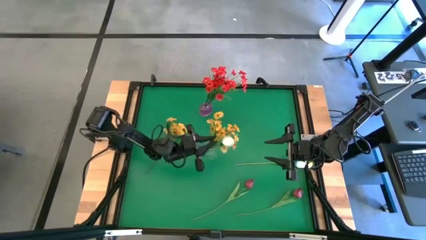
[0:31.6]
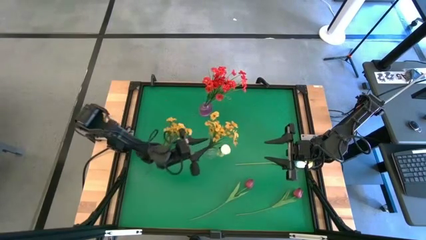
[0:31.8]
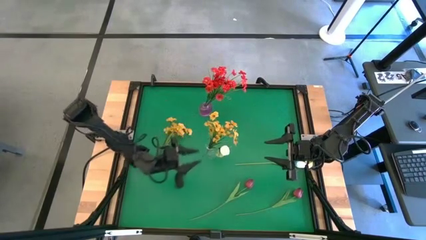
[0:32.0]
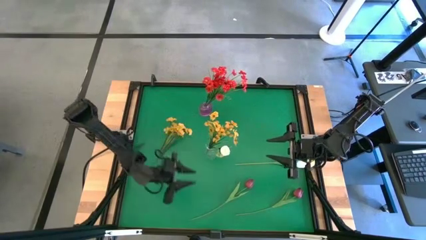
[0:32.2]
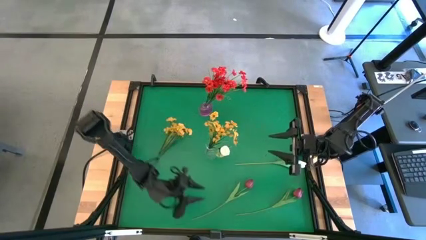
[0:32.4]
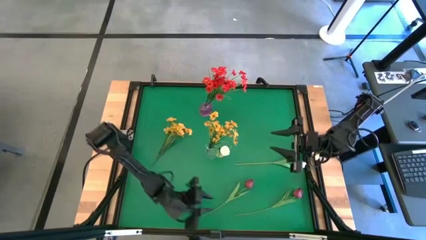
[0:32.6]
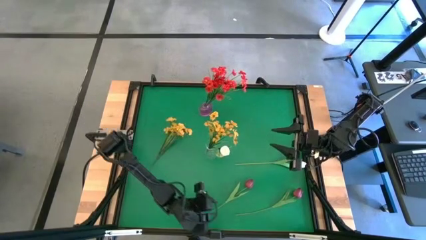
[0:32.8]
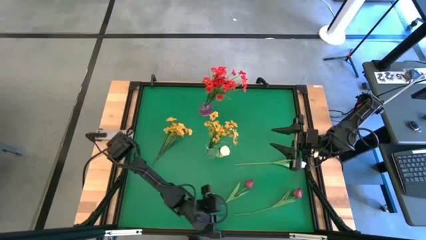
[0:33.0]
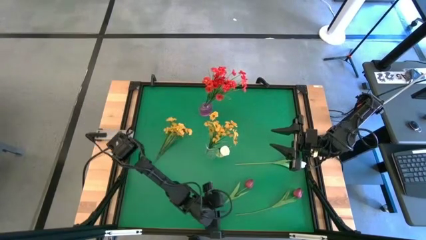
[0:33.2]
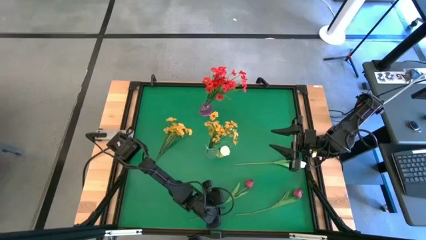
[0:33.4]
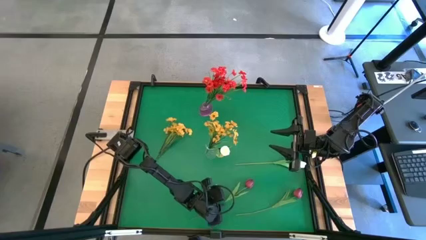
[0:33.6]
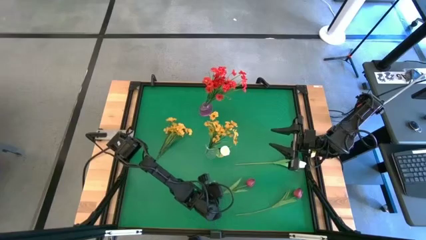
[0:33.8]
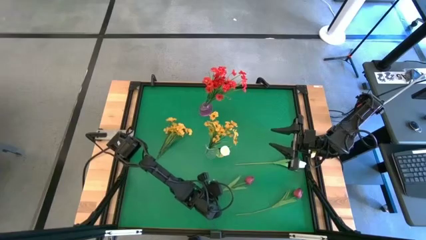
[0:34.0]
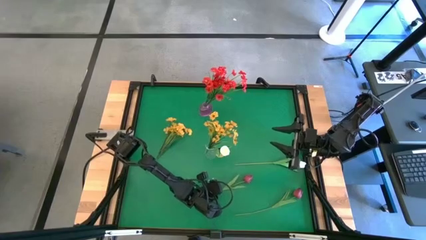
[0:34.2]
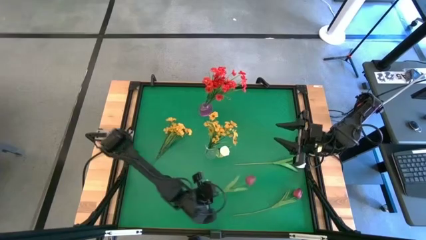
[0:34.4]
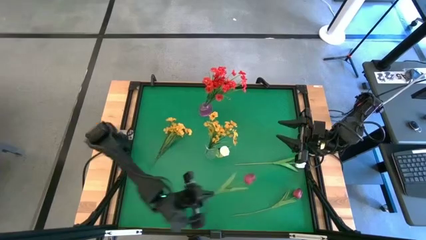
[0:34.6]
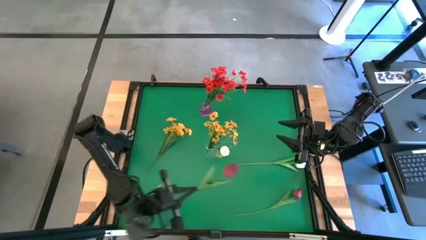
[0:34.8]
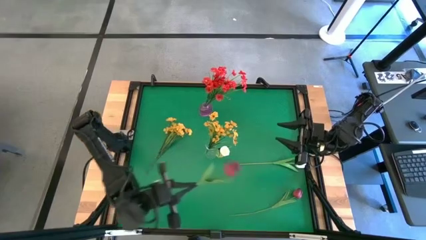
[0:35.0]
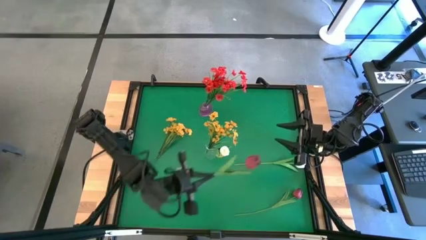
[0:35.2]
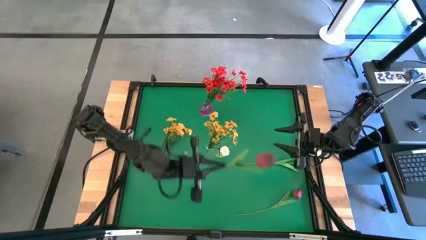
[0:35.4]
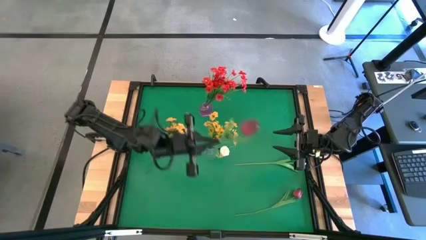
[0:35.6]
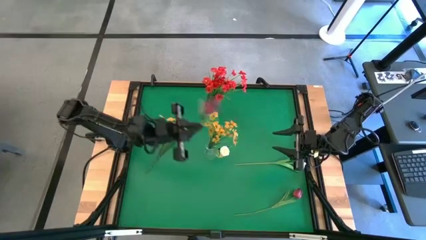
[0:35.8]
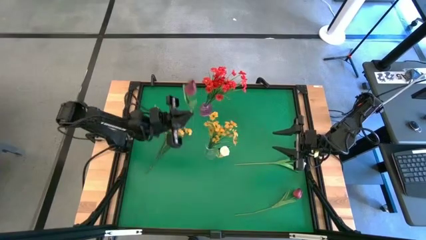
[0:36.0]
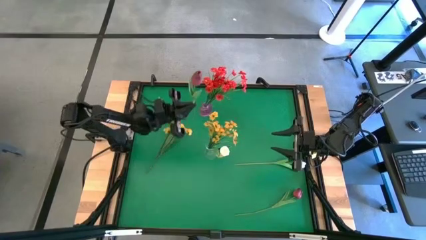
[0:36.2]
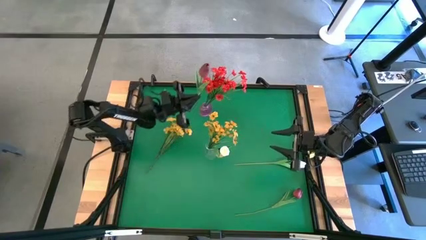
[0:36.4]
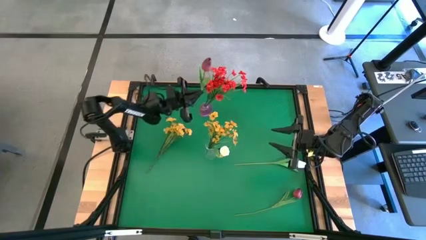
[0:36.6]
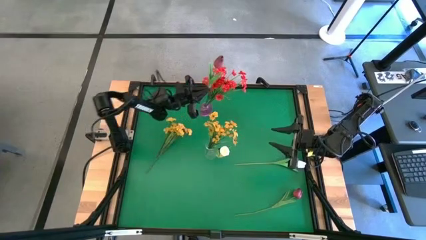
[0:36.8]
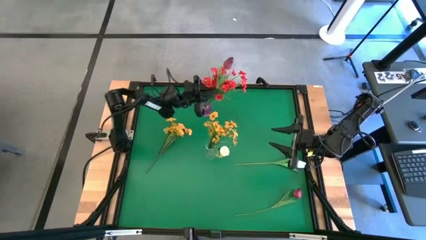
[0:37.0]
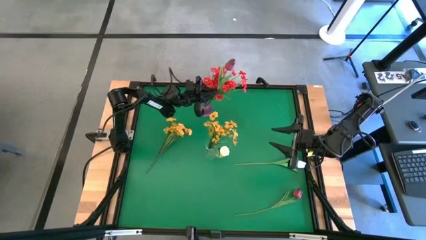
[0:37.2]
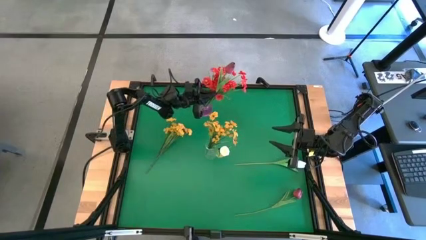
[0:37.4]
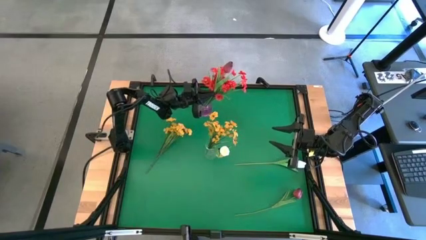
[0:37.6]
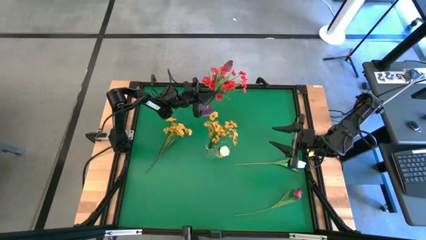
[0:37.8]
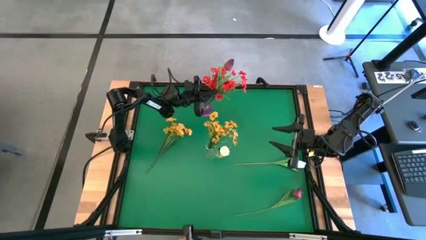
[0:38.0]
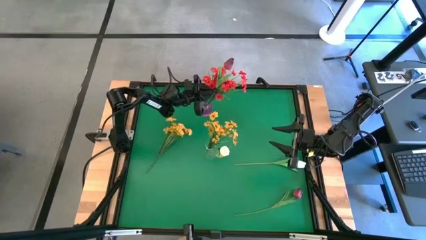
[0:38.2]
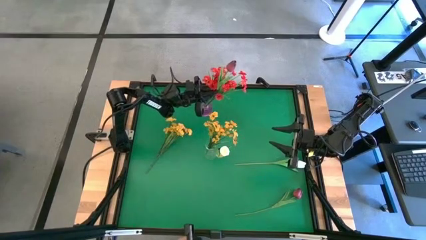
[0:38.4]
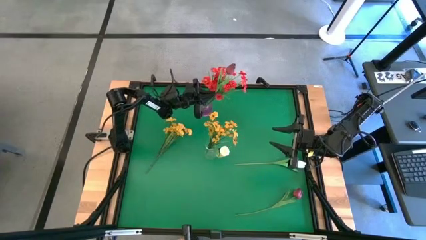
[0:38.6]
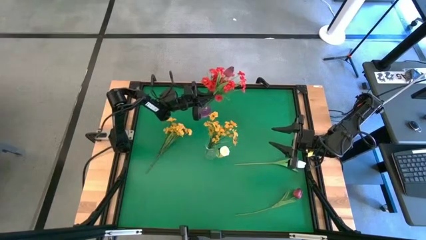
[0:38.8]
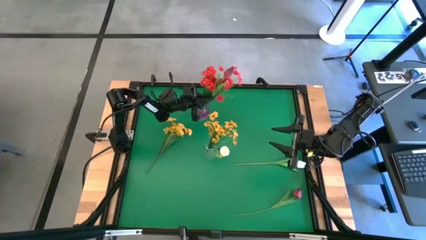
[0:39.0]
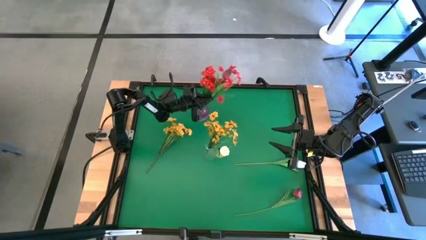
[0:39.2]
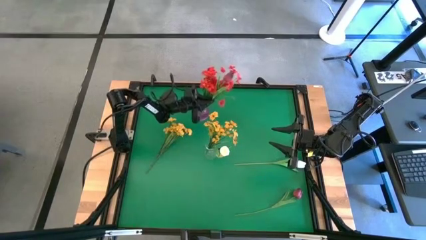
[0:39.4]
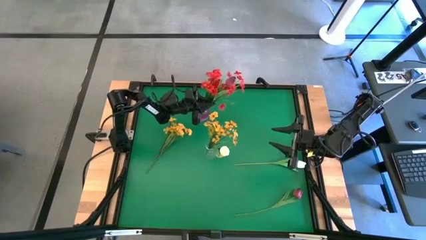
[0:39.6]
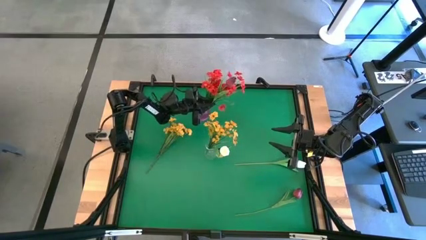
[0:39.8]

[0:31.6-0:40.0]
Task: Sort flowers into vase by color
Put the left red flower into the violet vase

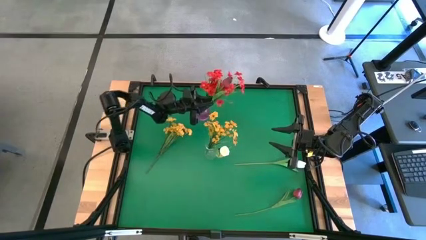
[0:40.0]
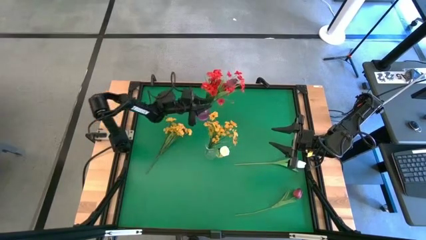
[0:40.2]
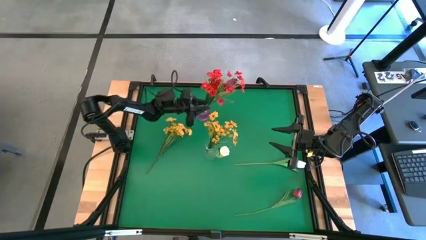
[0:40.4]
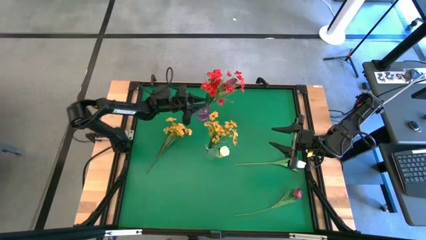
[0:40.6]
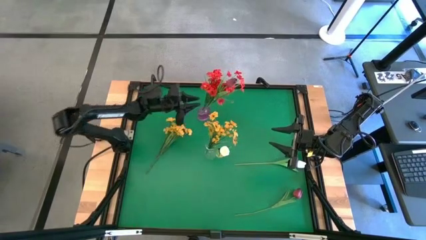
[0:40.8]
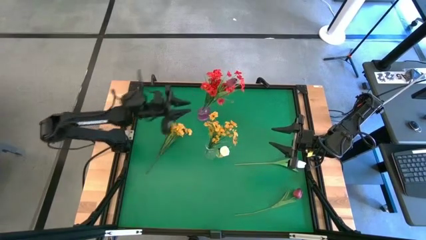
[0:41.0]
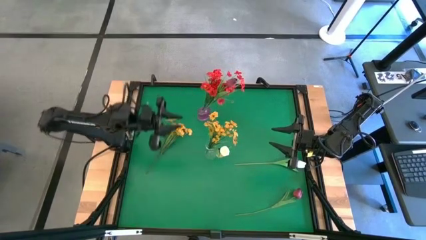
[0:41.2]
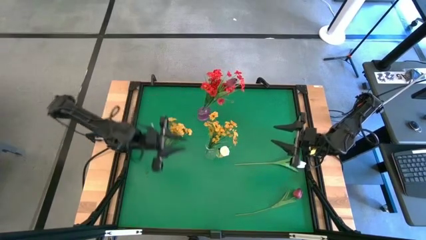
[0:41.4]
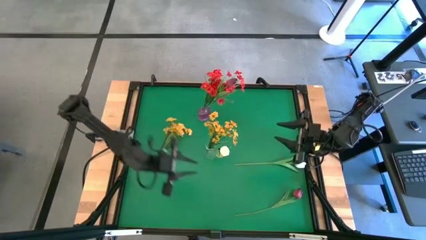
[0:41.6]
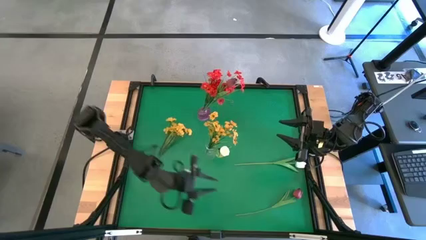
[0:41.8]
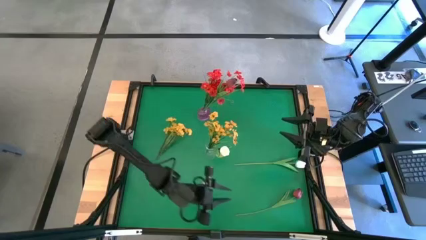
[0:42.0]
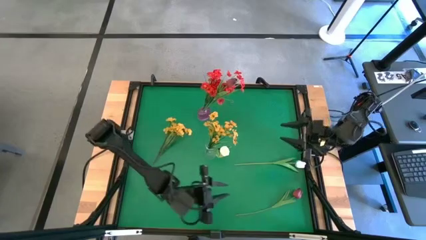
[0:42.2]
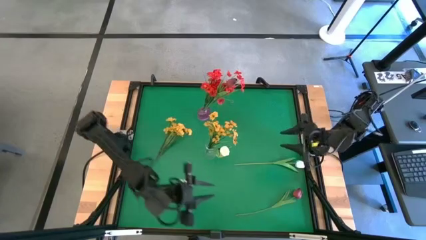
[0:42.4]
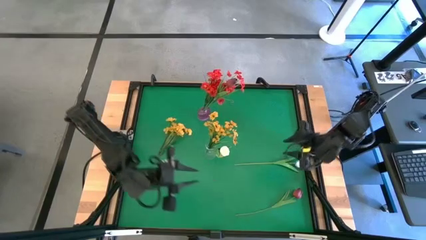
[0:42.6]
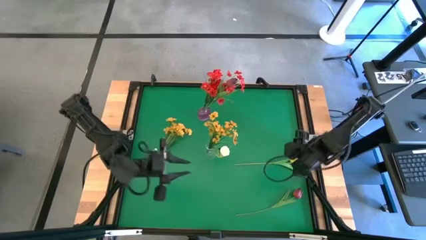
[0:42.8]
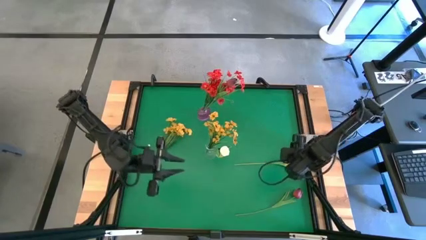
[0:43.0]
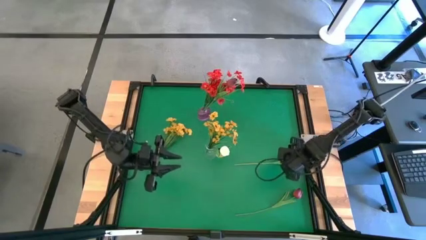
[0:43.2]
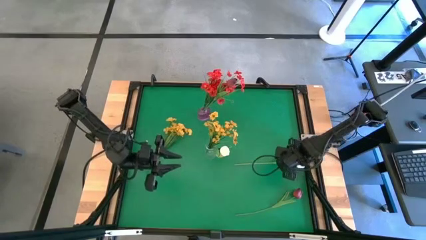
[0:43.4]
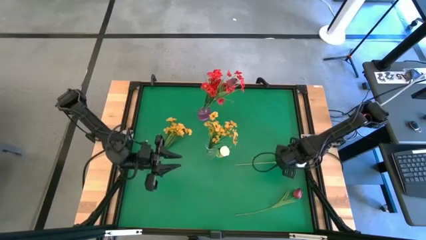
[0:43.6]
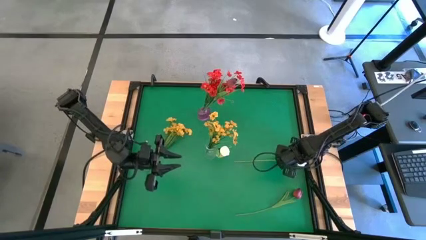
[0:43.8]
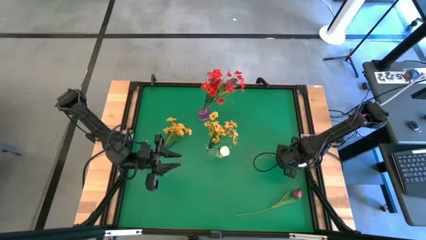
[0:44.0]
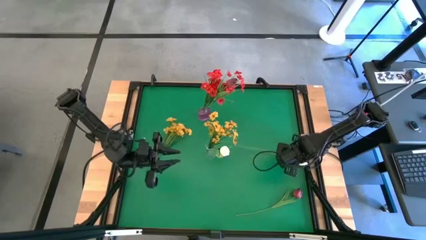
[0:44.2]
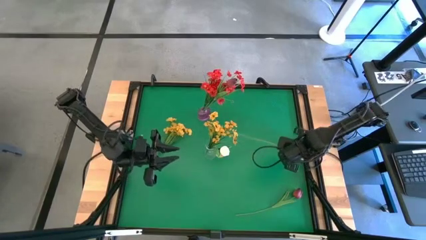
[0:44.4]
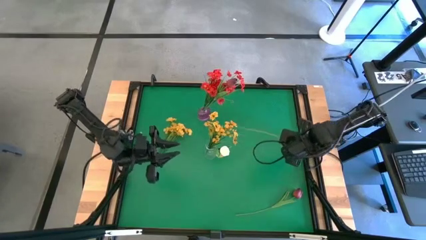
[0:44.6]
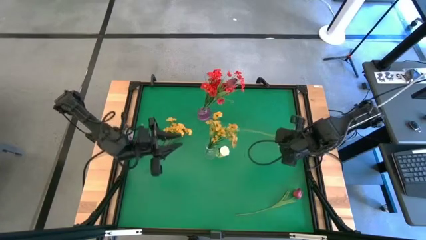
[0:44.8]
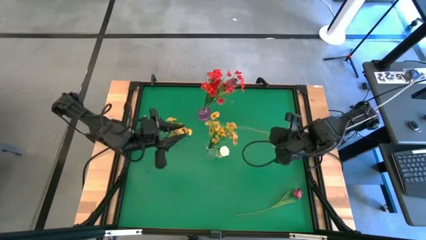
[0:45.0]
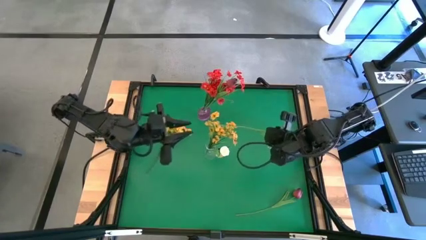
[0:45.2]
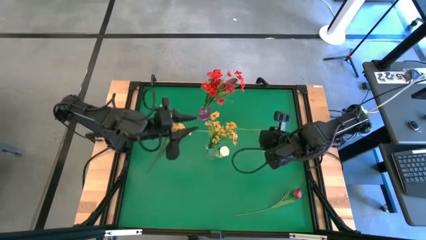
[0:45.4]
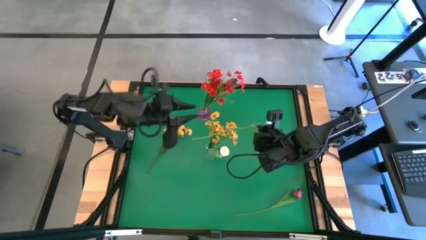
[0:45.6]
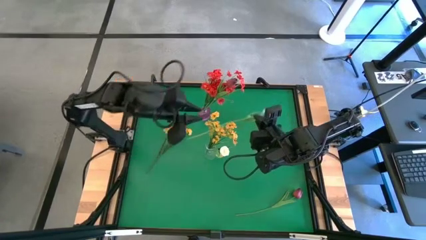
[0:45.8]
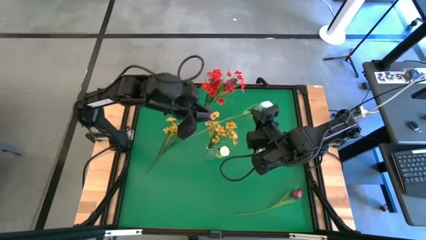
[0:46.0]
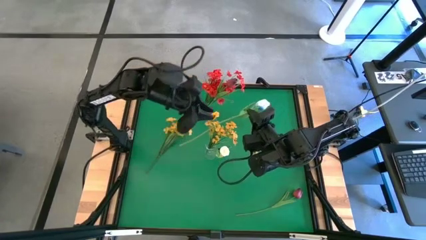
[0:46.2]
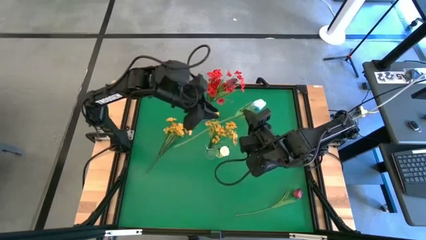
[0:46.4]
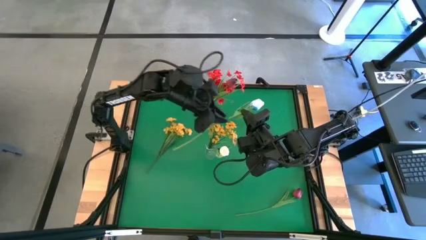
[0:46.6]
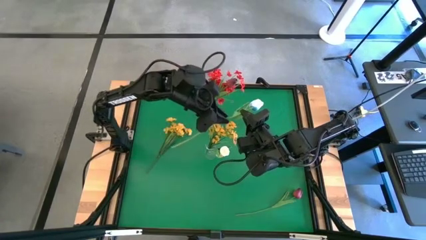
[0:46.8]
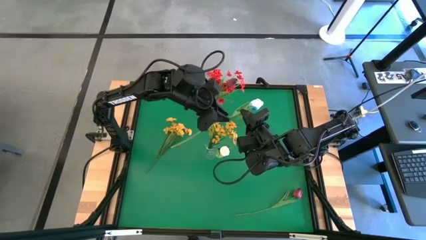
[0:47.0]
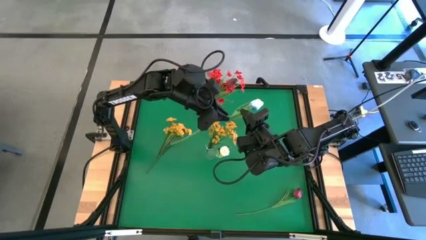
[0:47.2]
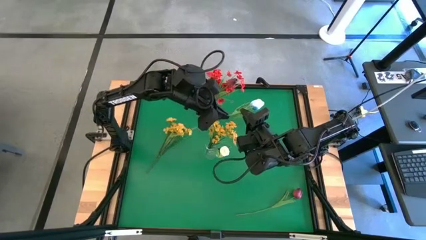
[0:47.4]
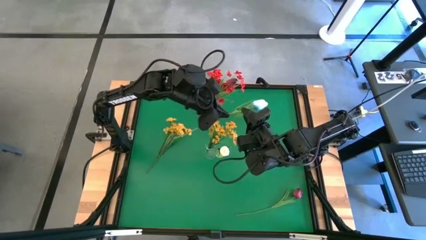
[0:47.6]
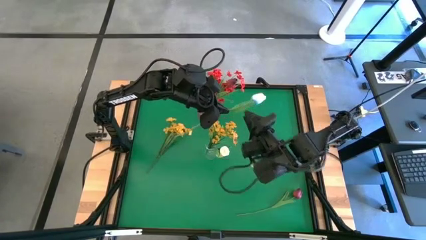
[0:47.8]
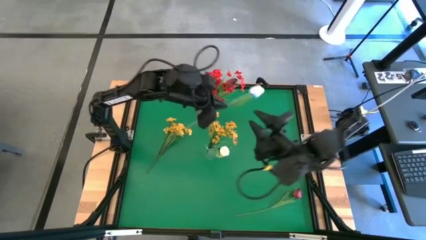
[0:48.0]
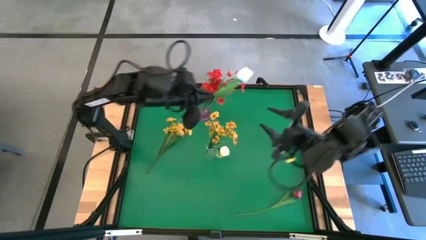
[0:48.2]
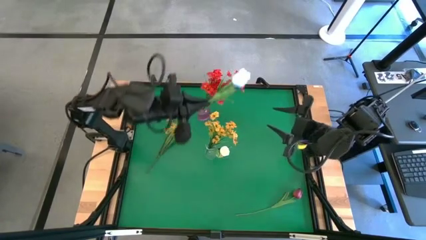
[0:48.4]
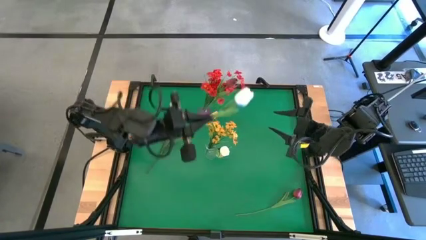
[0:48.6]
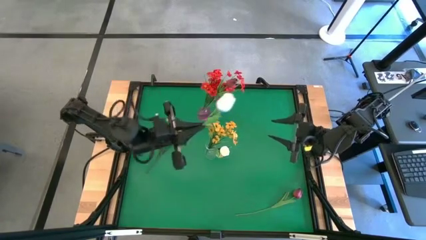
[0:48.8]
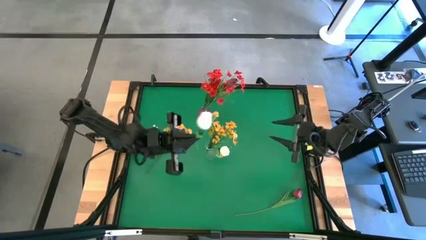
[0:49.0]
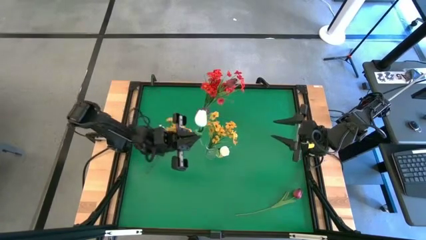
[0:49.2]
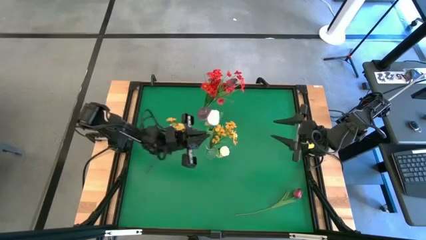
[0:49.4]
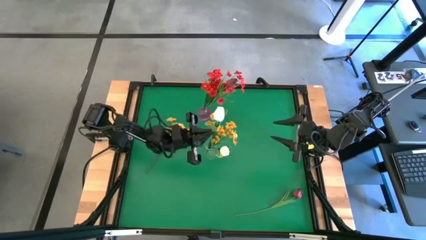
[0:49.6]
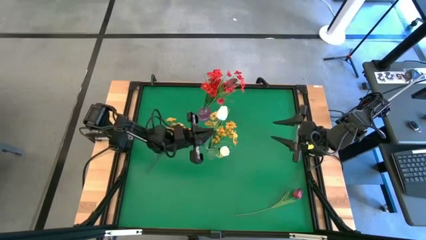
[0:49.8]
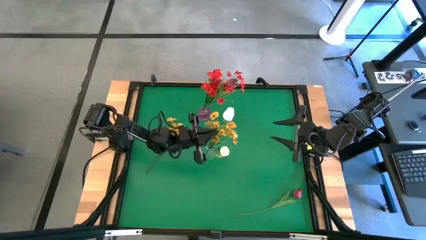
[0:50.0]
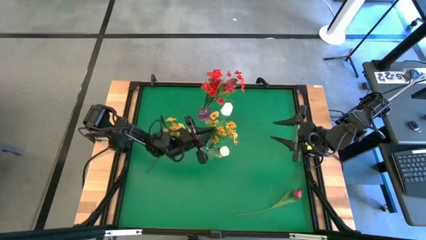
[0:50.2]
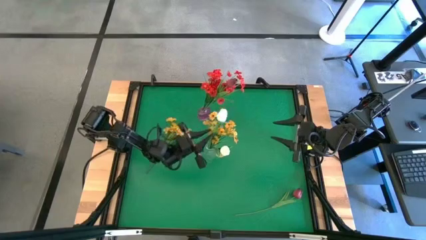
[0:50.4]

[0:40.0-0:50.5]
Put the white flower into the transparent vase
